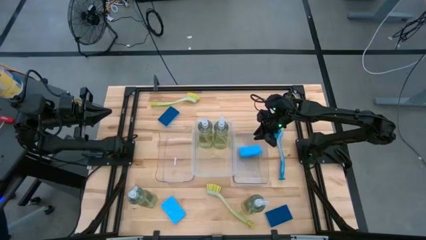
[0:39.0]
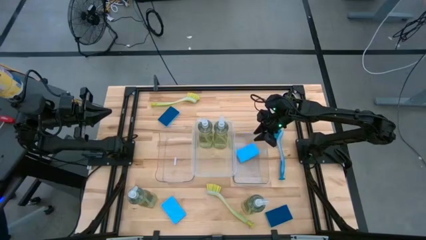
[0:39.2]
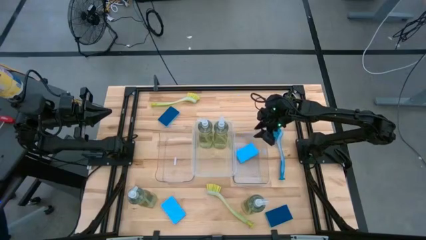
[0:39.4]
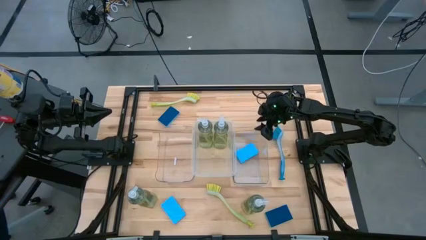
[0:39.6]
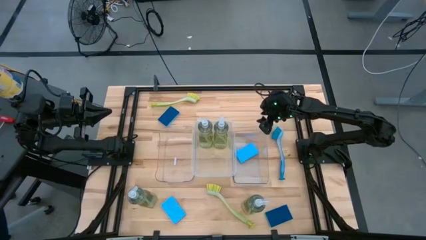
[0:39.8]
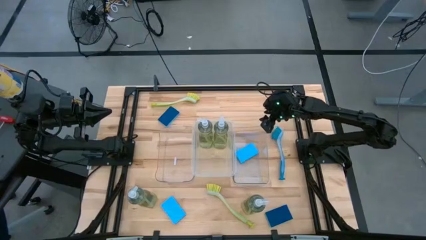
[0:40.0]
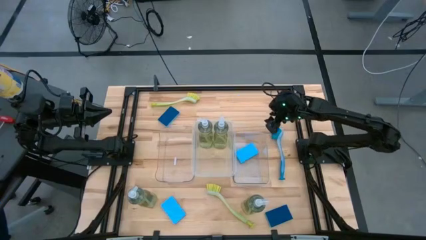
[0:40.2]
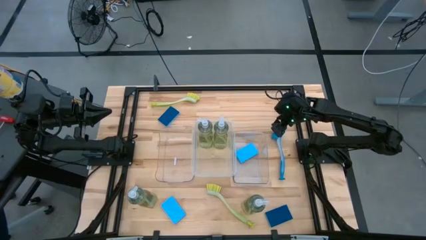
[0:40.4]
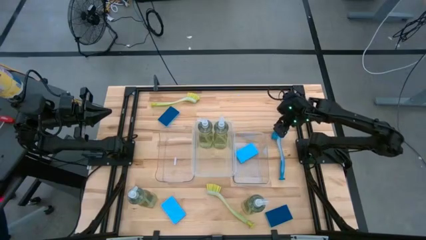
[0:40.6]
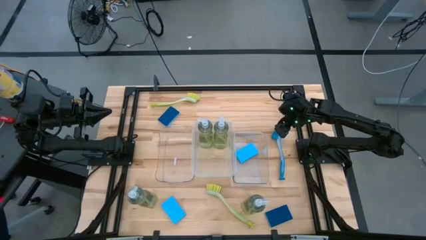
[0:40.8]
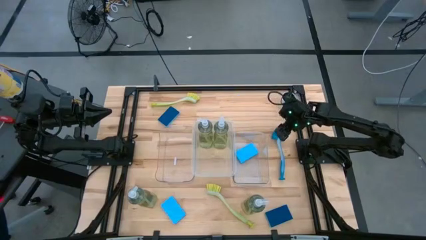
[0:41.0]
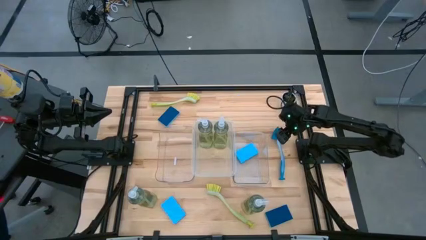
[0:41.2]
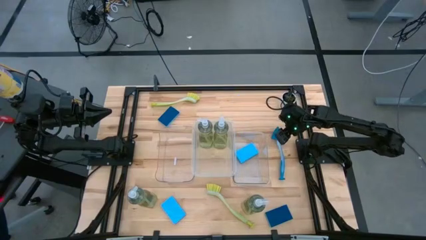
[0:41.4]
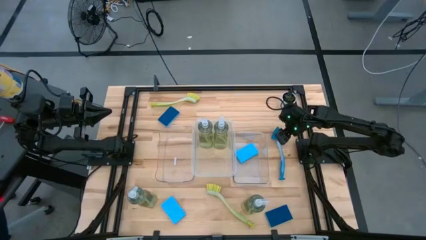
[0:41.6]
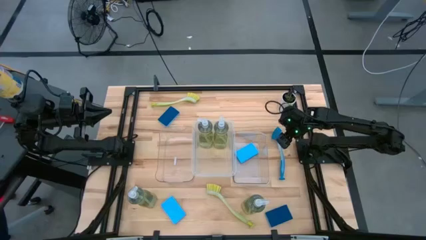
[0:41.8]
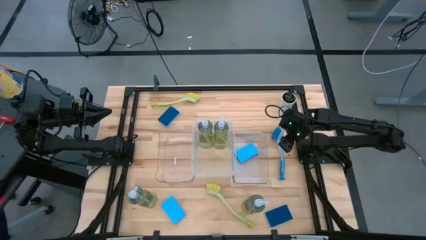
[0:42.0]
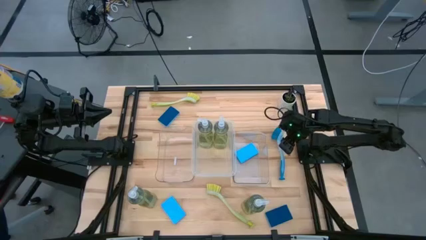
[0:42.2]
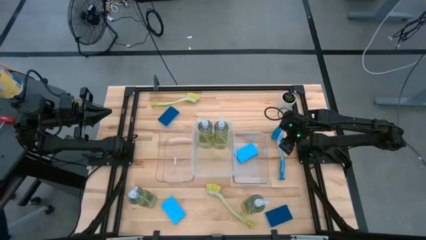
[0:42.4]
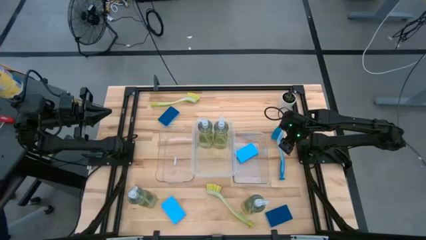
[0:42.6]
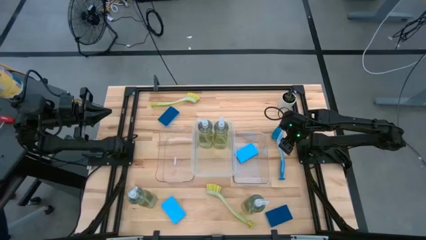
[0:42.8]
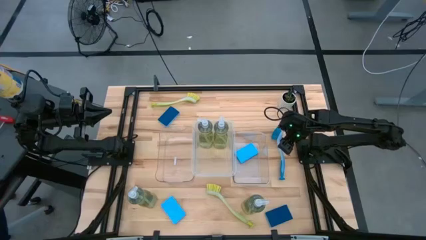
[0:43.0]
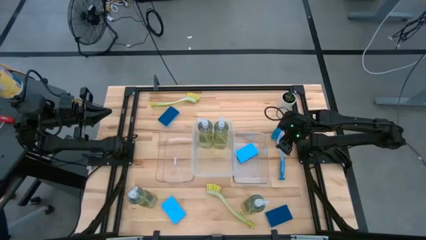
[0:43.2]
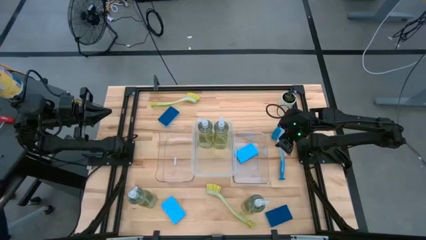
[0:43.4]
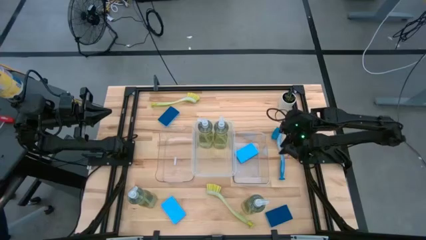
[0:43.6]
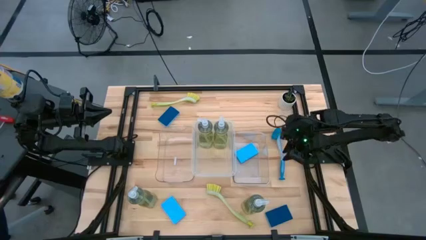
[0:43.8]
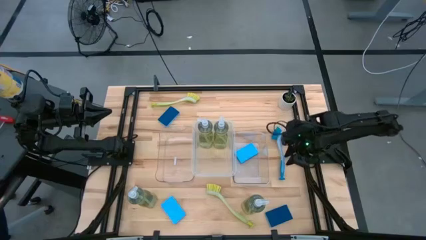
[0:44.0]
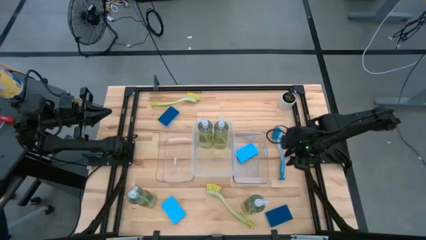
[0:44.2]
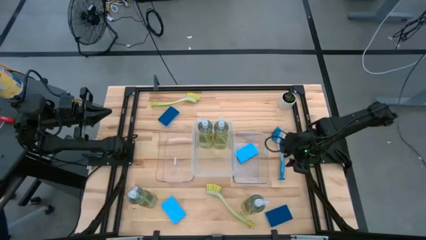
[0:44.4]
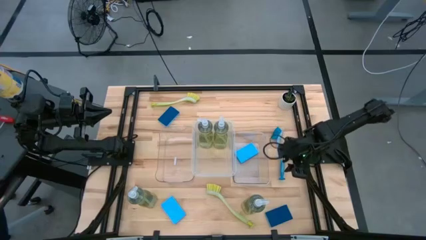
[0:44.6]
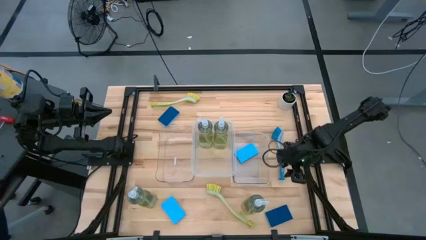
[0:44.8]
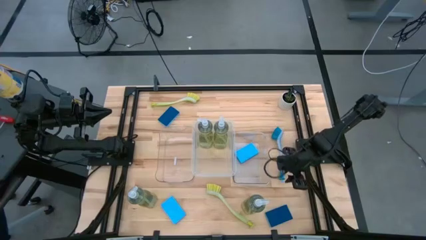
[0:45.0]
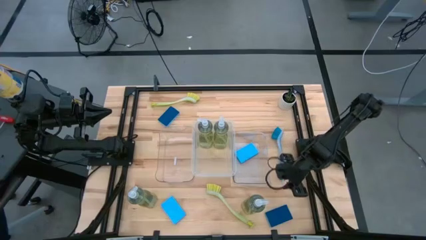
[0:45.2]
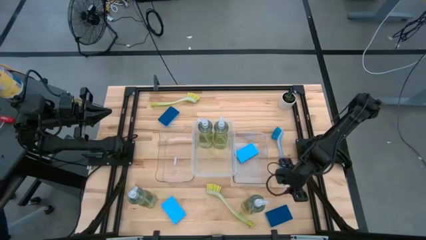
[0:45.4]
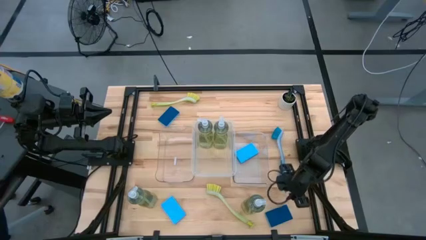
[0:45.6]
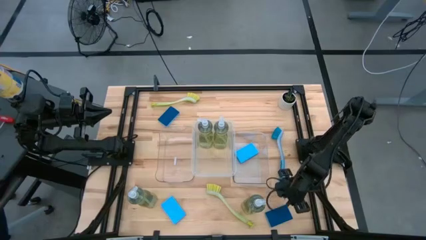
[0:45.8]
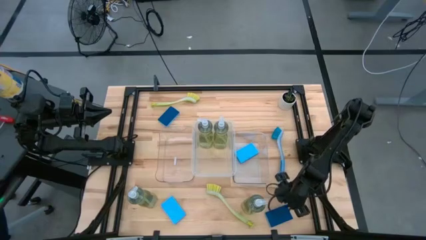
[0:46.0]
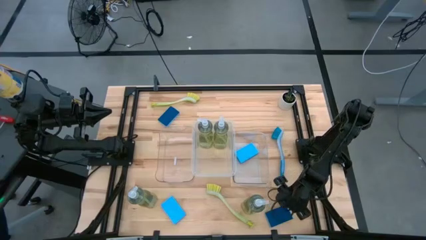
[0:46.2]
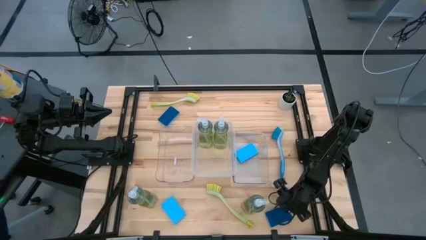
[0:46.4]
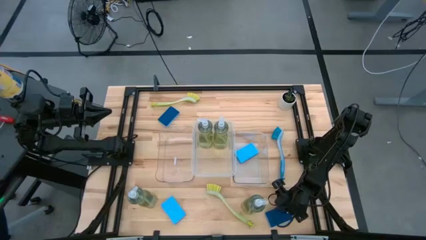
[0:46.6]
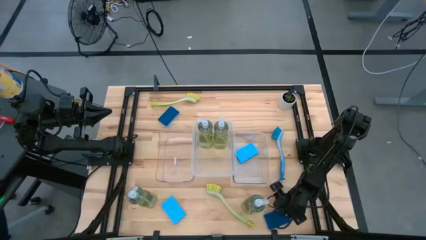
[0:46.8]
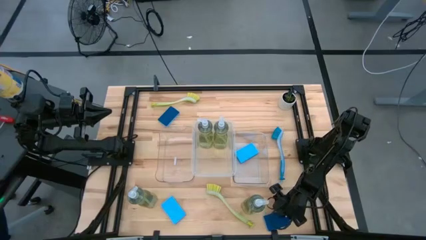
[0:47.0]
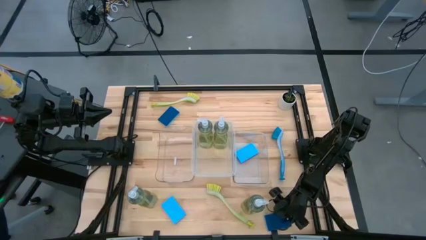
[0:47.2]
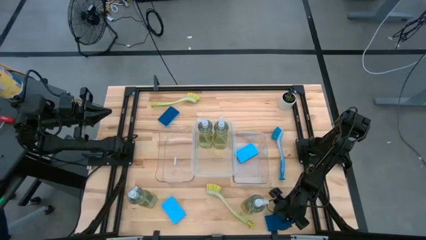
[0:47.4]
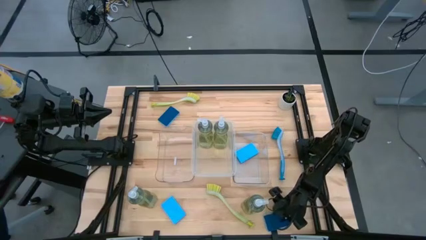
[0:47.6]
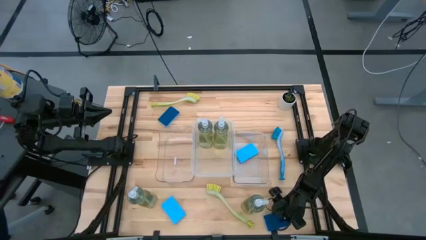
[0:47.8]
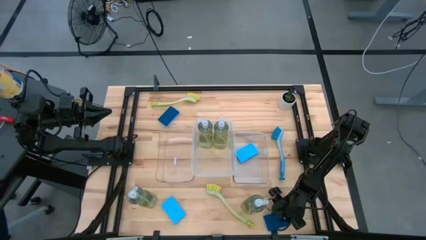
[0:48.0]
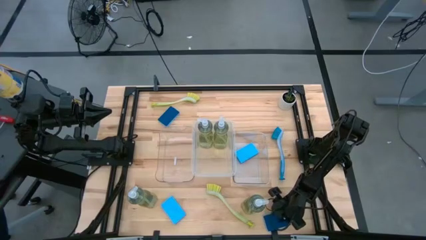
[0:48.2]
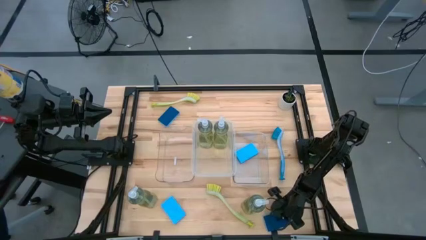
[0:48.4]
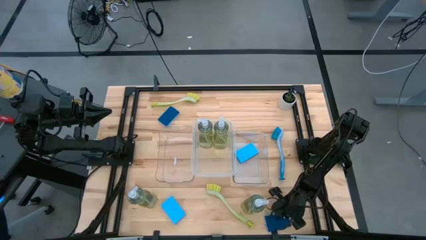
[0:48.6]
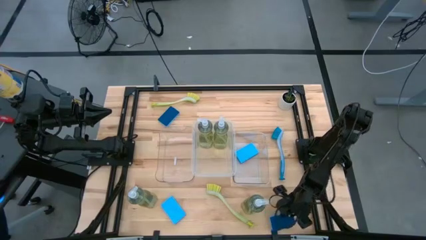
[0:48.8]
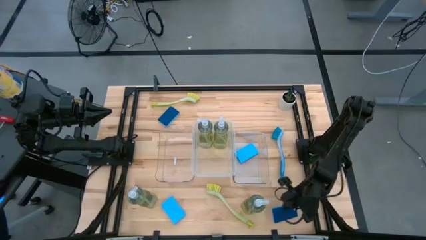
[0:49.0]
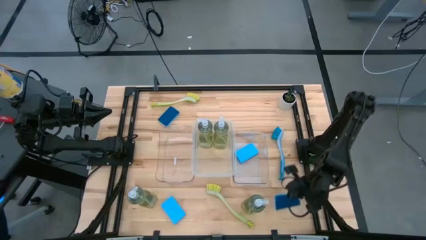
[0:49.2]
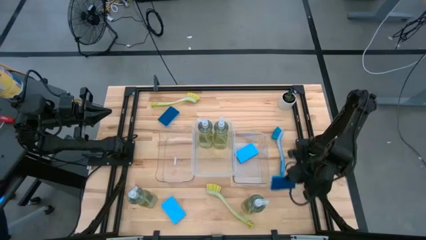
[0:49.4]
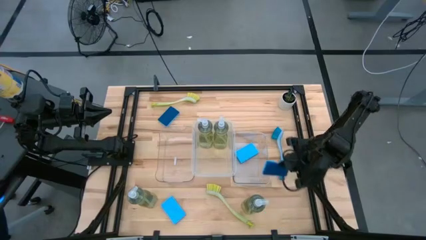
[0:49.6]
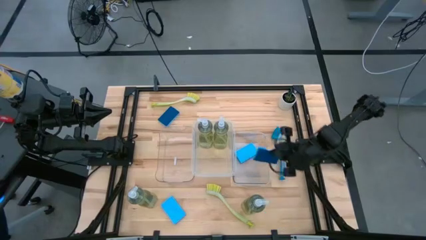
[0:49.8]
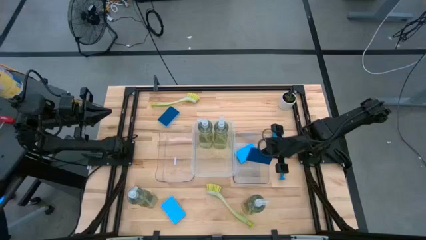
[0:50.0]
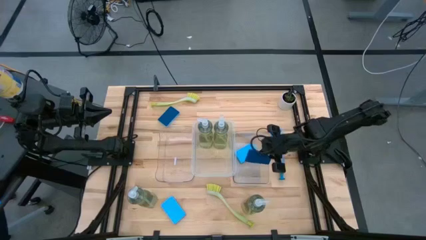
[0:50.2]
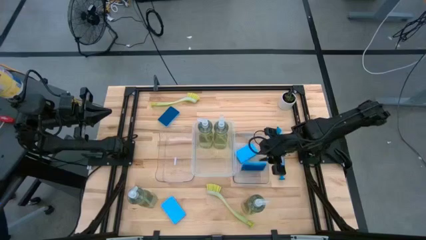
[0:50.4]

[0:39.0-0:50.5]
Task: Pick & Place Kitchen Sink Supplies
Put the blue sponge wipe into the right transparent bin
